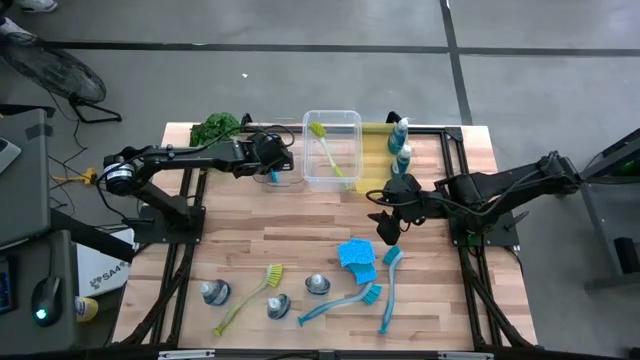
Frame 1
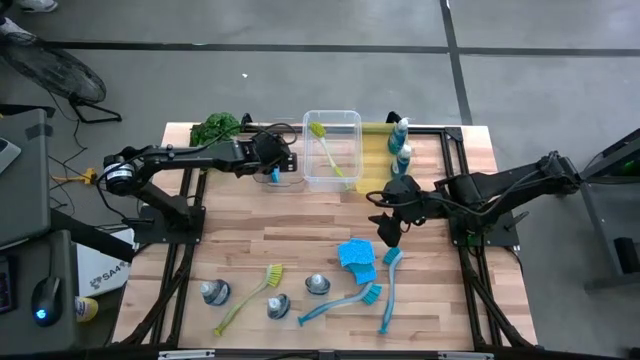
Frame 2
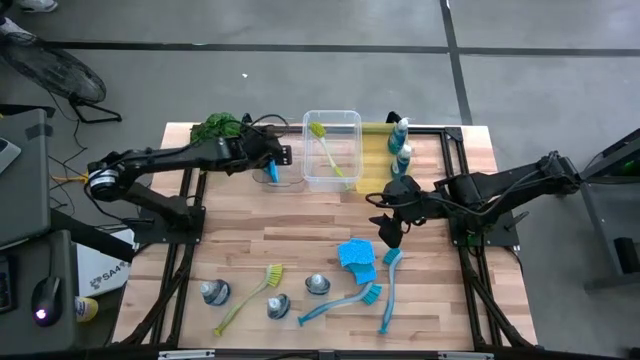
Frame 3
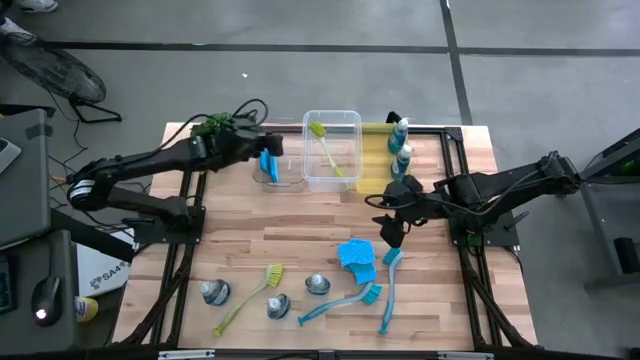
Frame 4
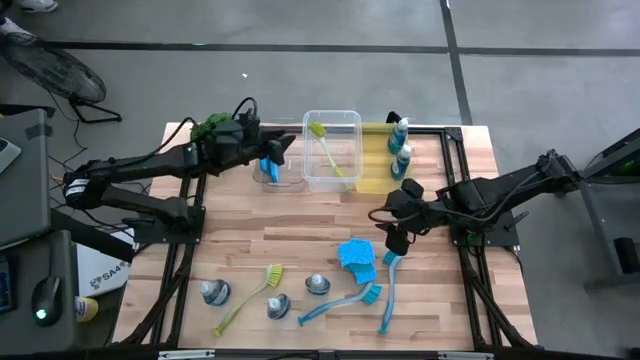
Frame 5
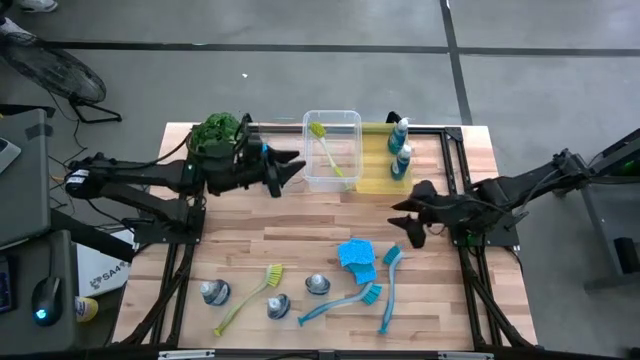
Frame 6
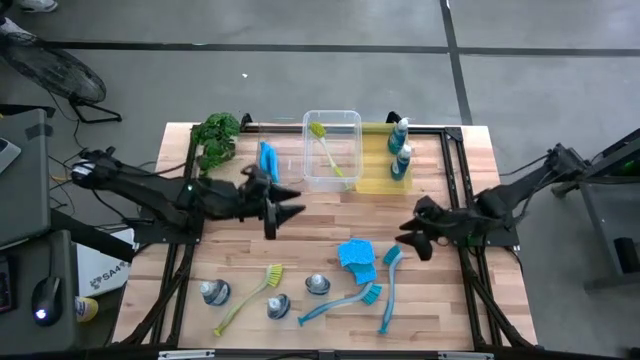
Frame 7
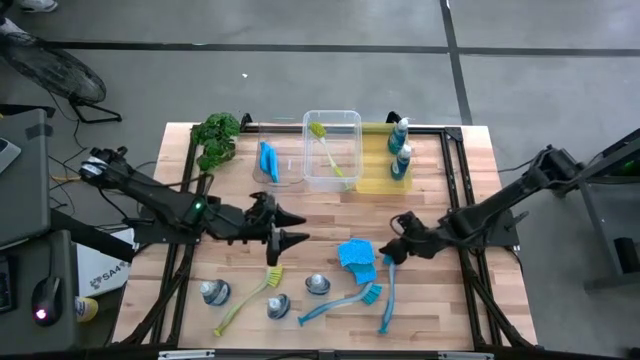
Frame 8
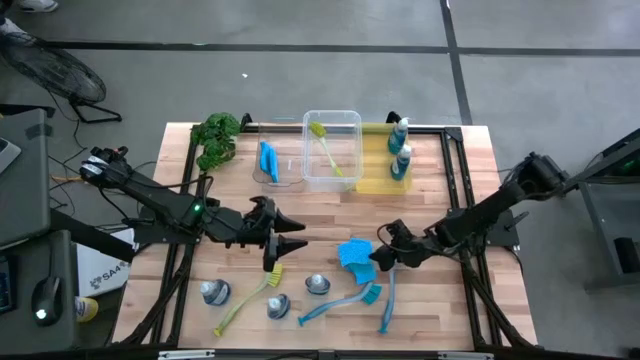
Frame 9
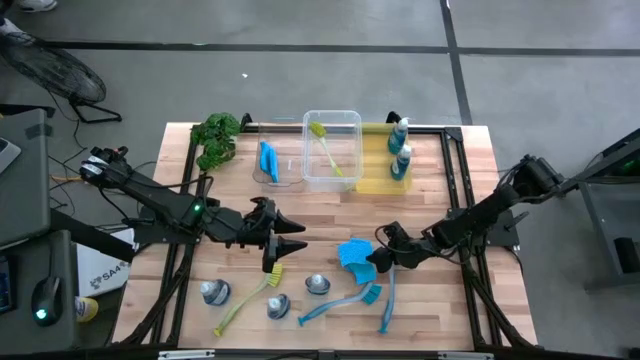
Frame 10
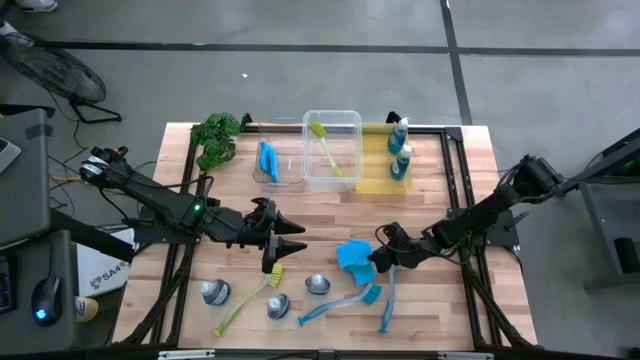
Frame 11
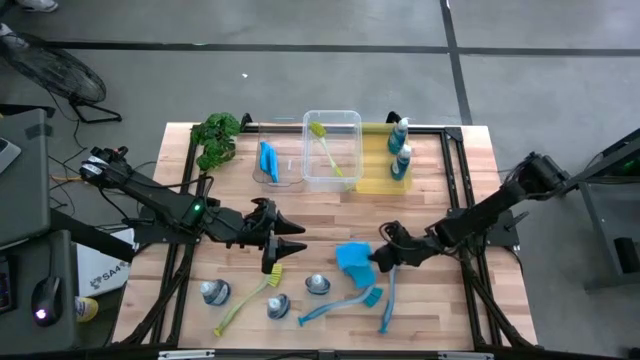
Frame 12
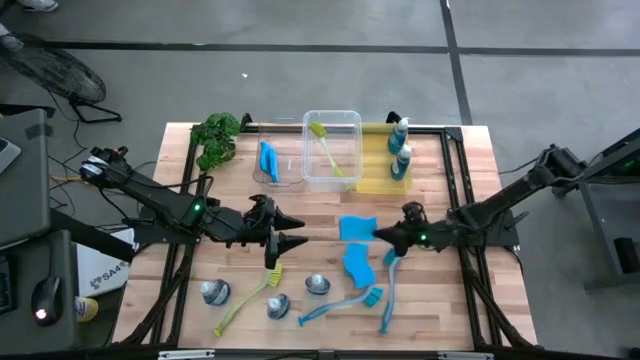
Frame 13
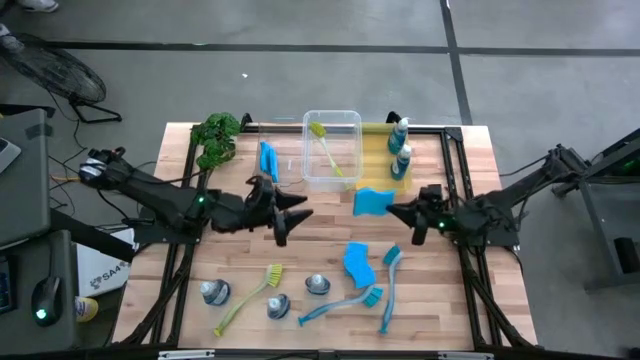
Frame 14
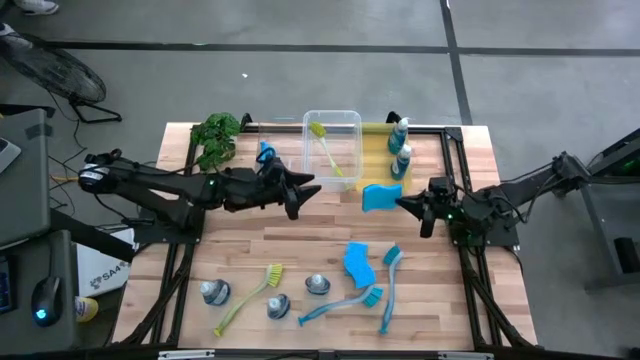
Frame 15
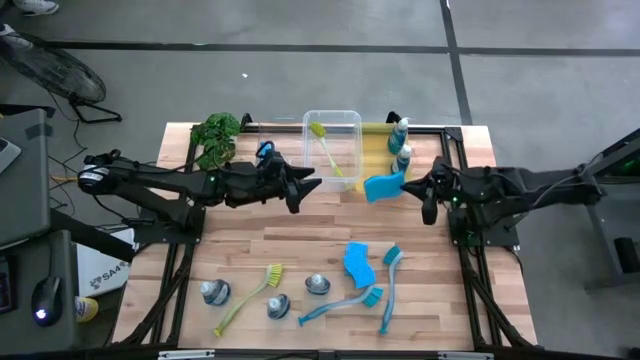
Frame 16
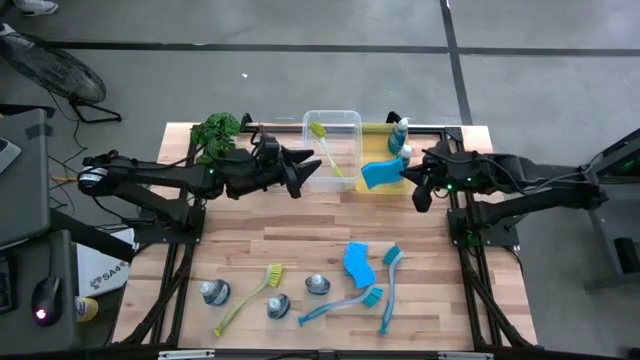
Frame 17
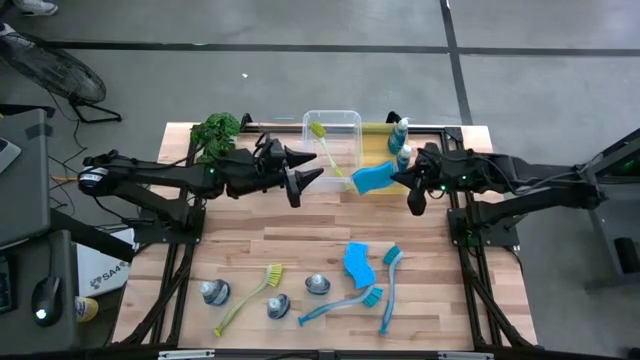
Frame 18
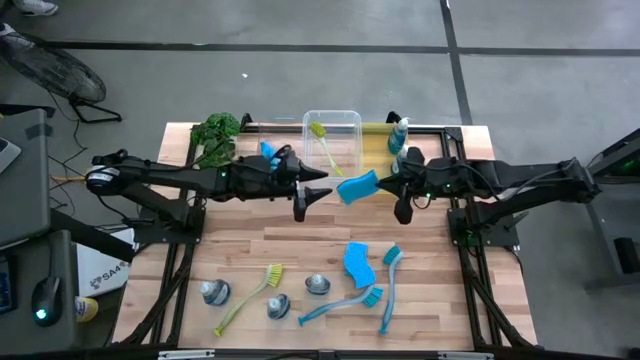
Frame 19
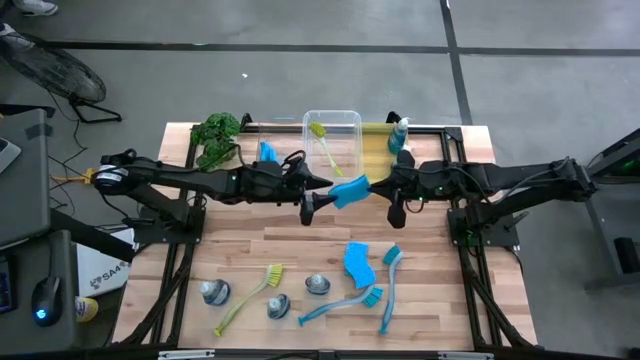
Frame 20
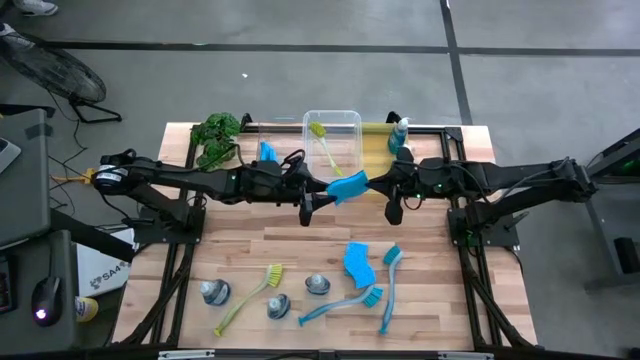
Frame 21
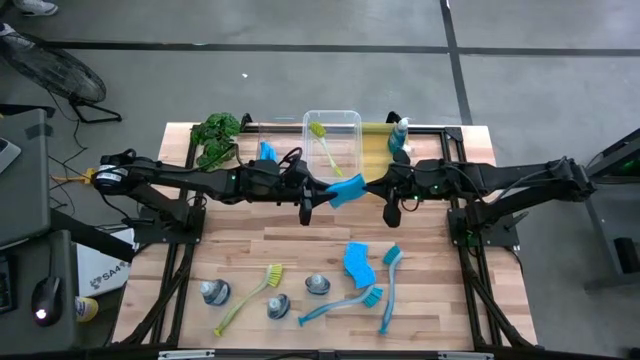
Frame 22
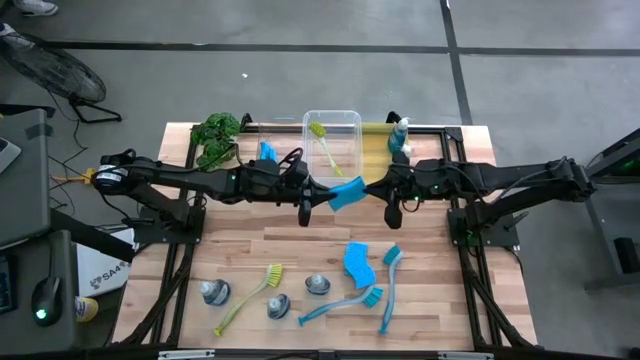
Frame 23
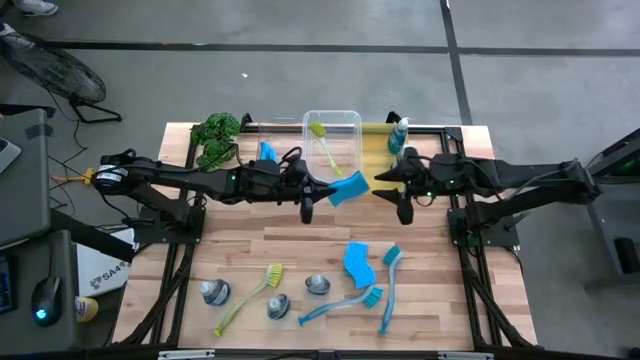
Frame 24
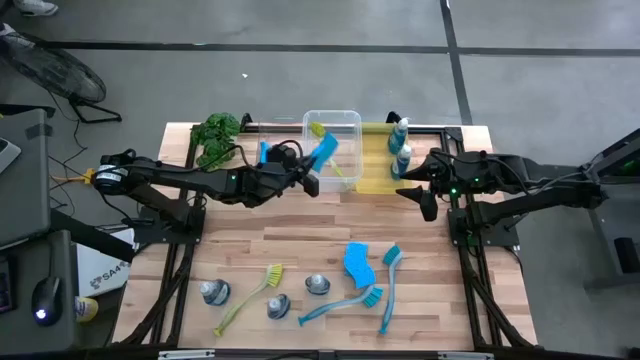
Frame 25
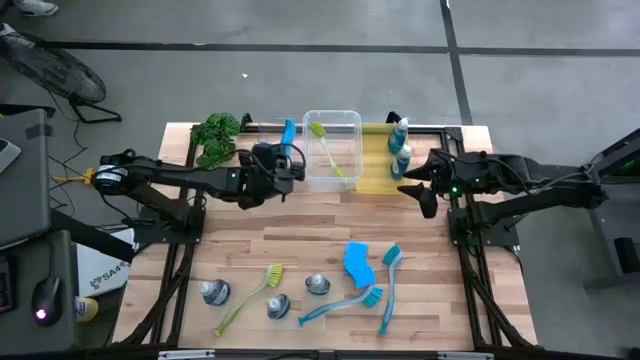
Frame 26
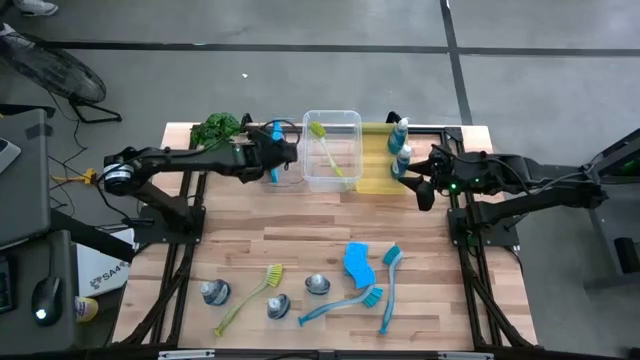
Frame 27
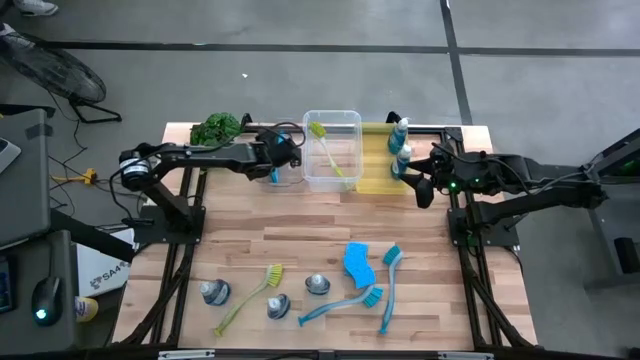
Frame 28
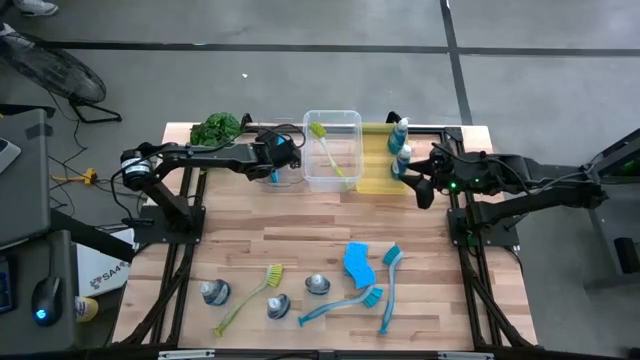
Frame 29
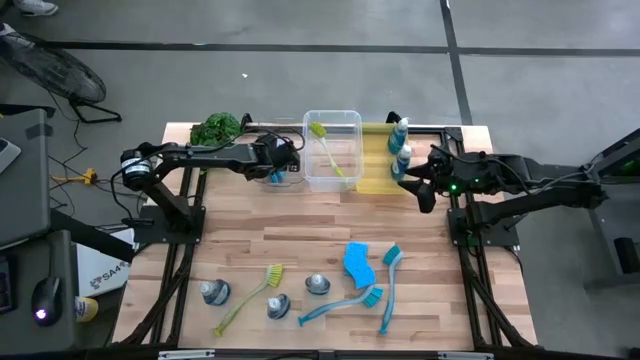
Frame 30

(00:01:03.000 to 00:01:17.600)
Task: Pick & Place Kitchen Sink Supplies
Put the sponge into the transparent bin

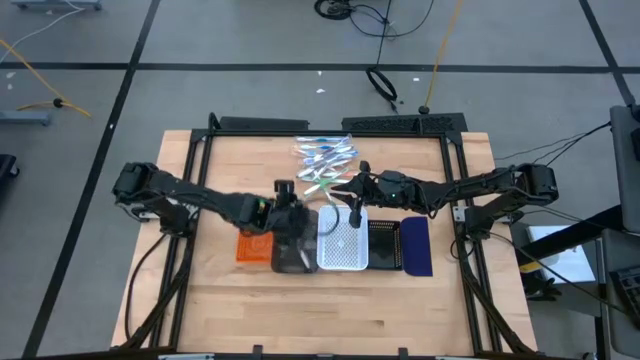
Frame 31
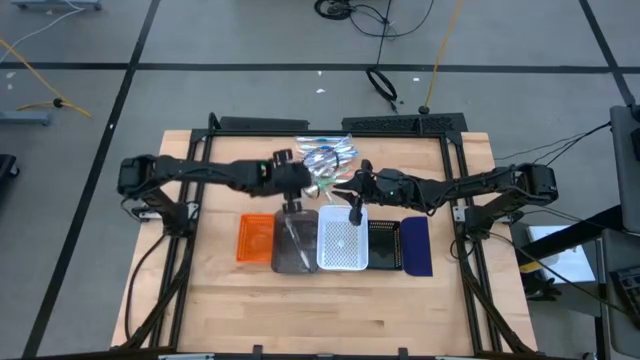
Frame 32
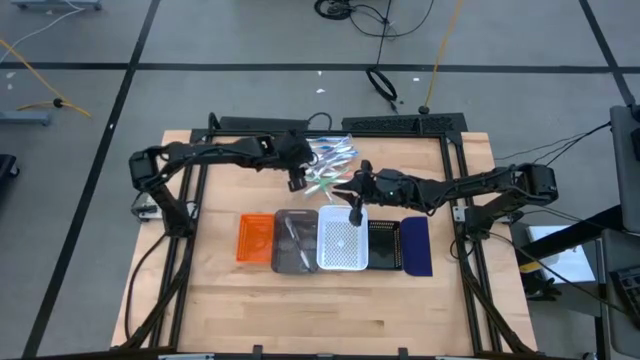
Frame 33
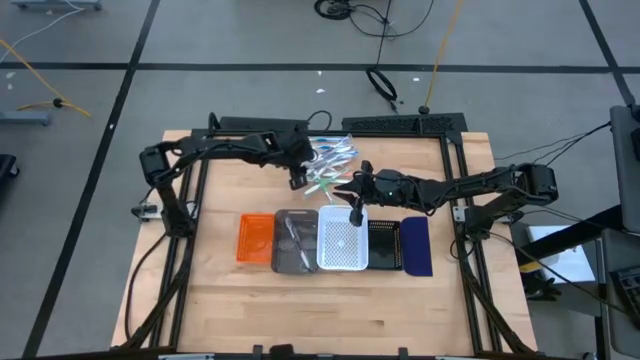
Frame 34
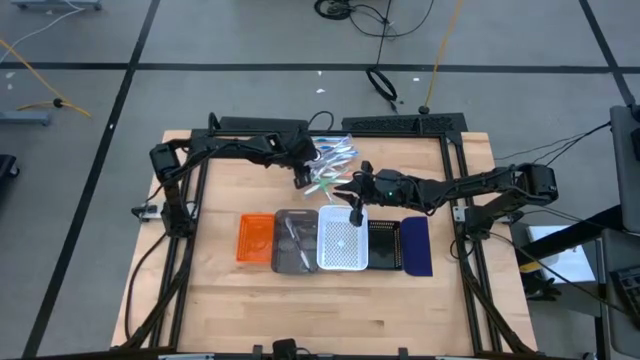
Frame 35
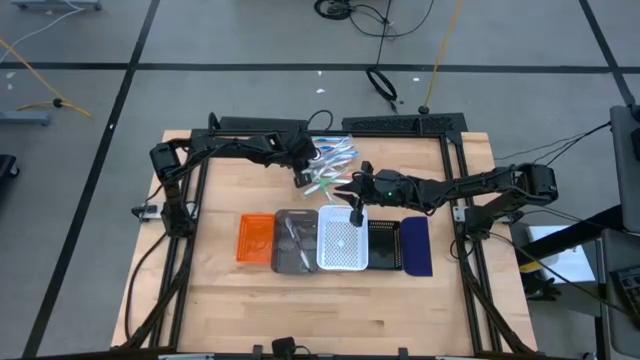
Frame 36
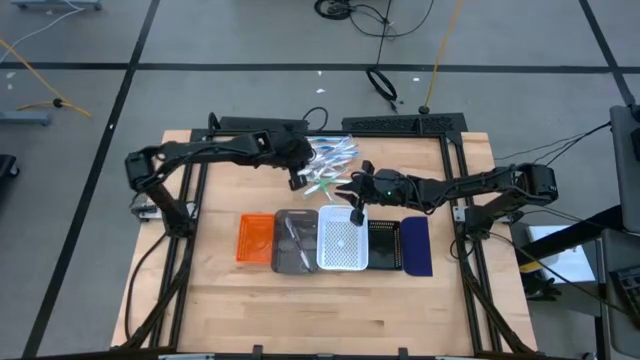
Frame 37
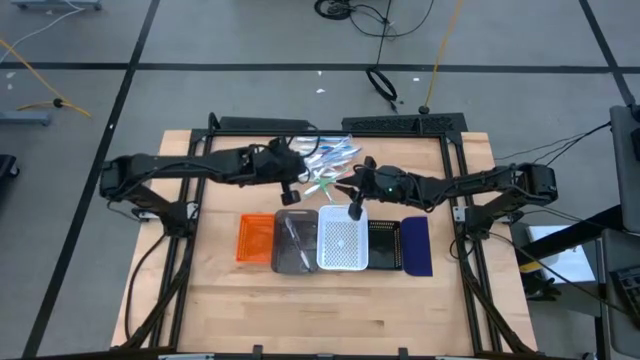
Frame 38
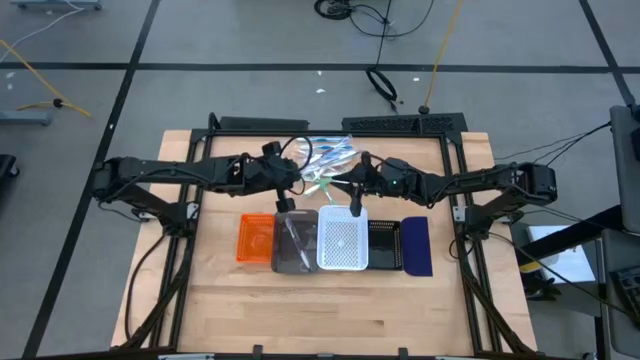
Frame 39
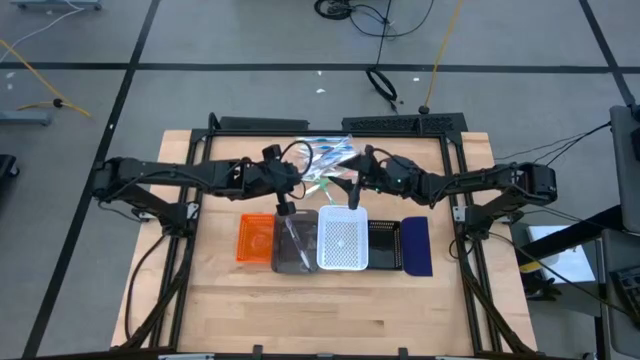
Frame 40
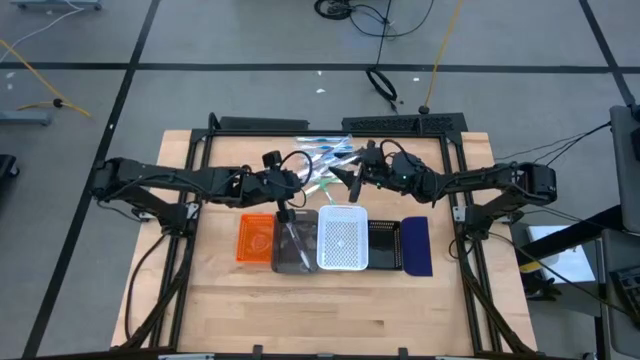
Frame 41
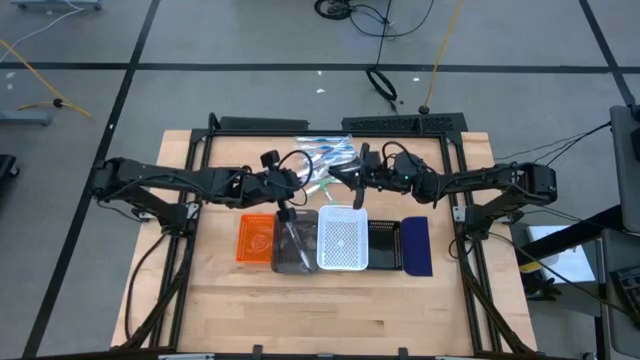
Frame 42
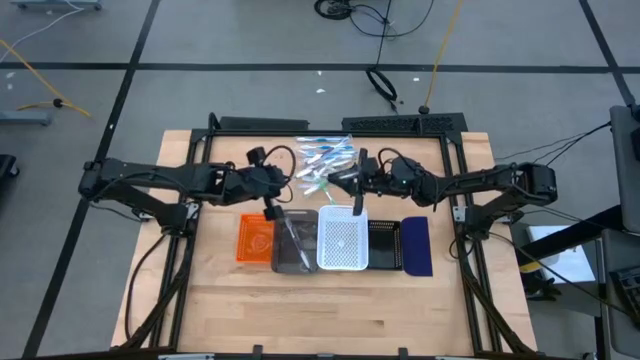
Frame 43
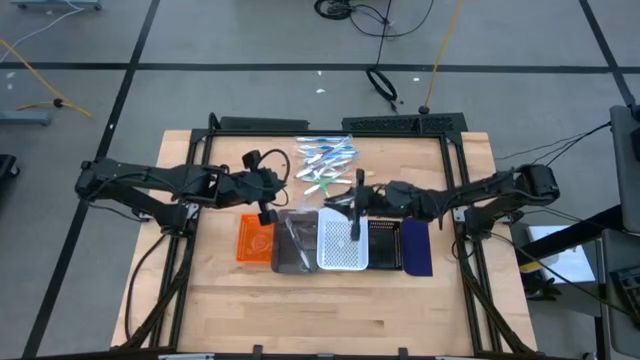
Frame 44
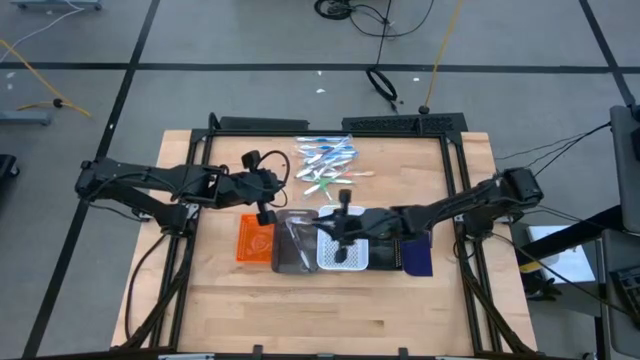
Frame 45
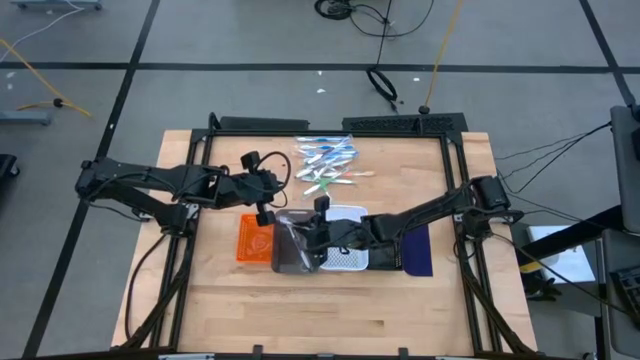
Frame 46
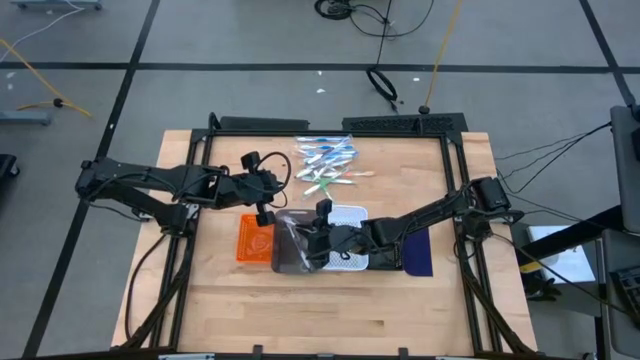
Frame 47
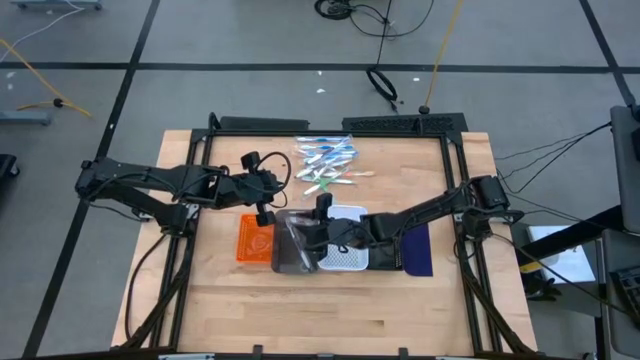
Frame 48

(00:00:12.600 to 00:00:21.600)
Task: Pick & Place Toothbrushes
Put the purple toothbrush into the left black bin
